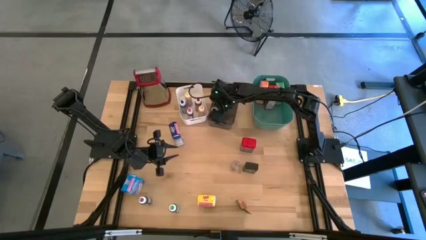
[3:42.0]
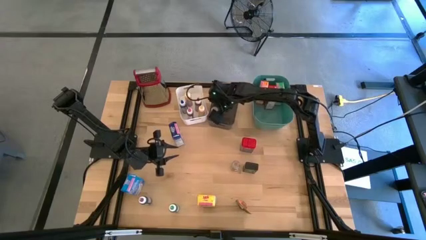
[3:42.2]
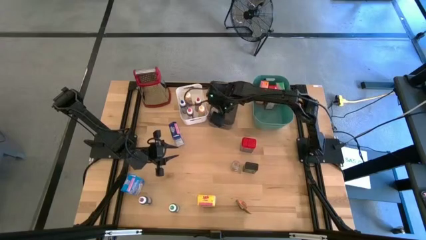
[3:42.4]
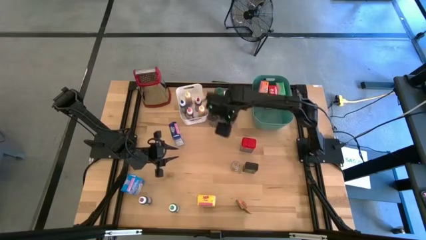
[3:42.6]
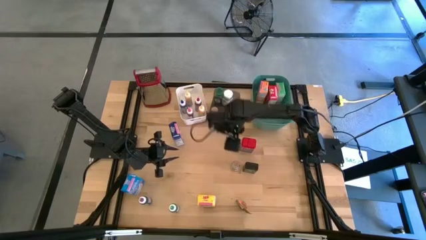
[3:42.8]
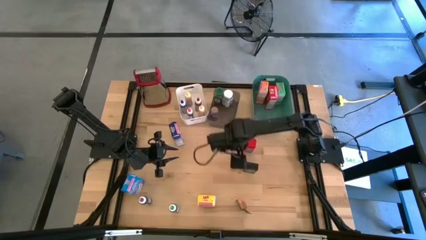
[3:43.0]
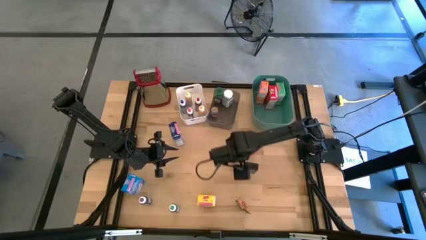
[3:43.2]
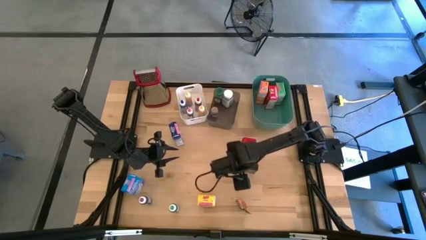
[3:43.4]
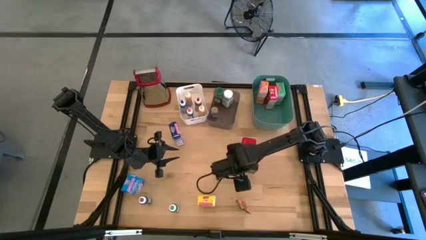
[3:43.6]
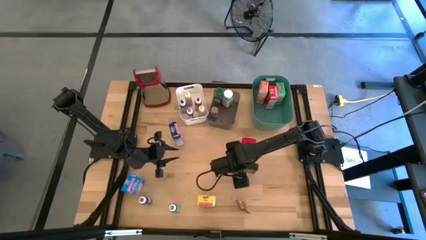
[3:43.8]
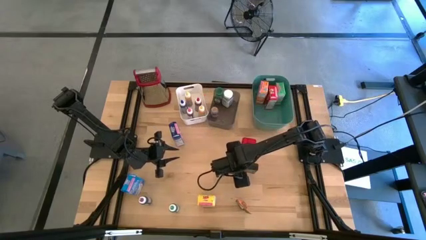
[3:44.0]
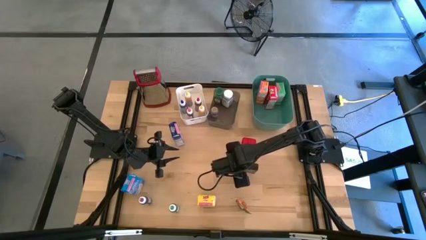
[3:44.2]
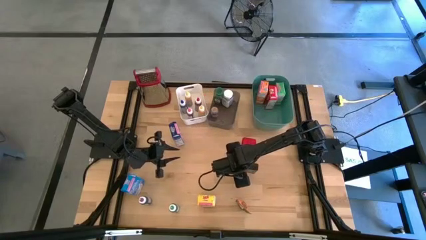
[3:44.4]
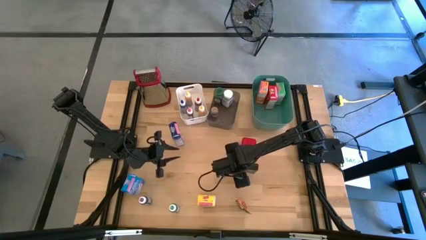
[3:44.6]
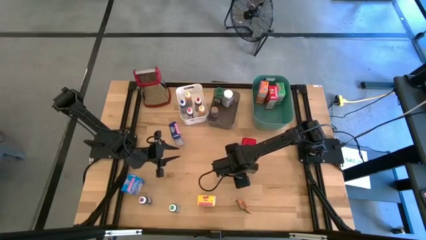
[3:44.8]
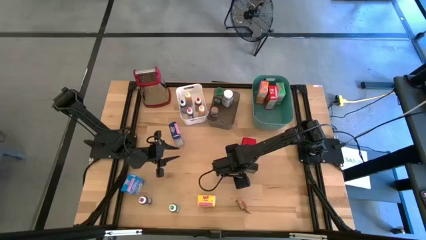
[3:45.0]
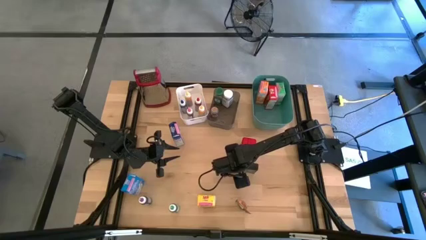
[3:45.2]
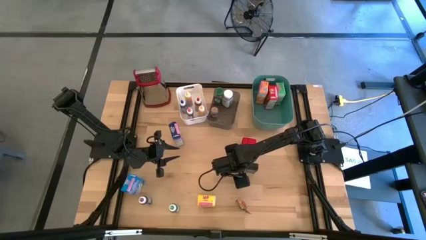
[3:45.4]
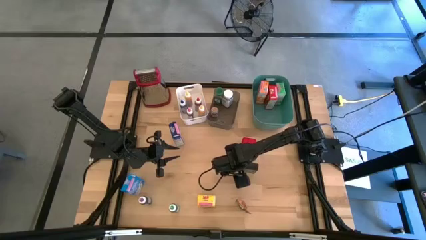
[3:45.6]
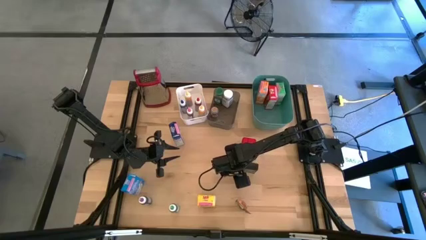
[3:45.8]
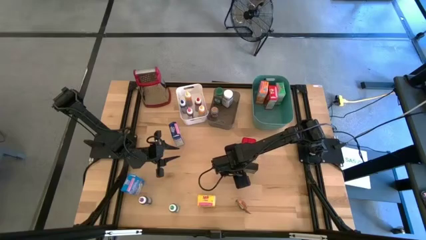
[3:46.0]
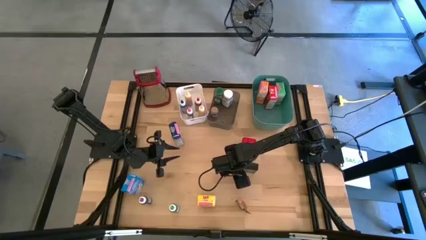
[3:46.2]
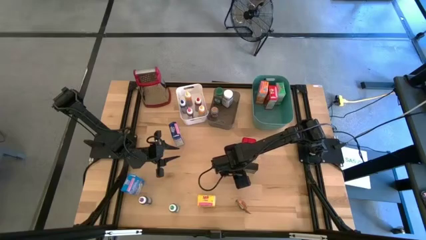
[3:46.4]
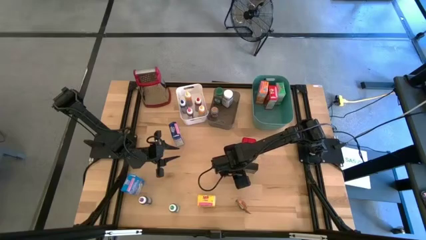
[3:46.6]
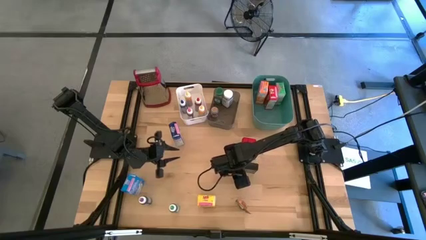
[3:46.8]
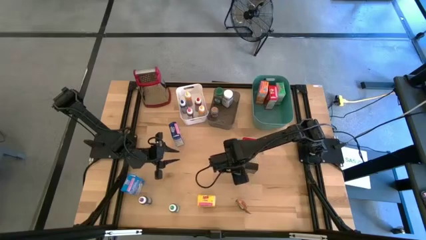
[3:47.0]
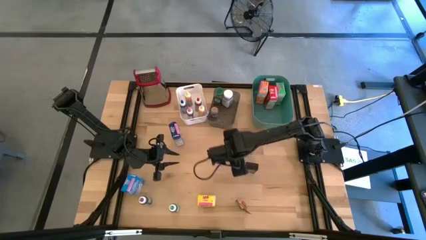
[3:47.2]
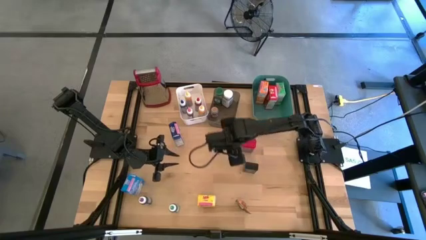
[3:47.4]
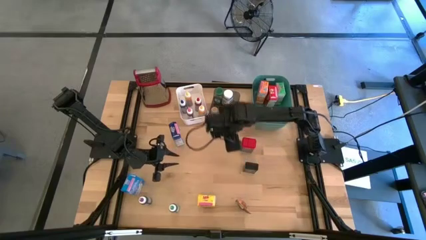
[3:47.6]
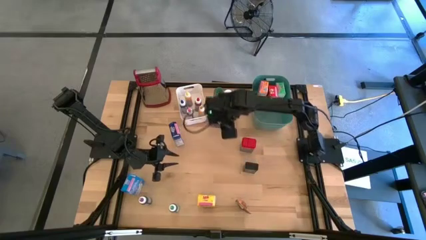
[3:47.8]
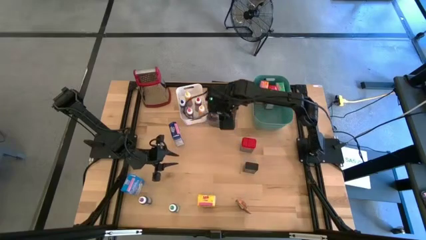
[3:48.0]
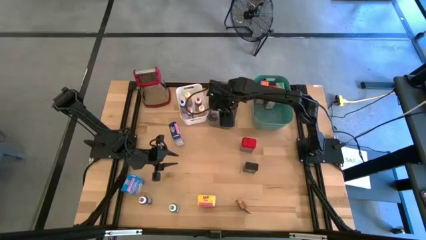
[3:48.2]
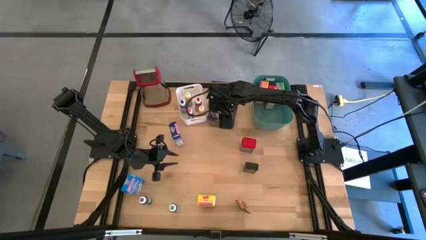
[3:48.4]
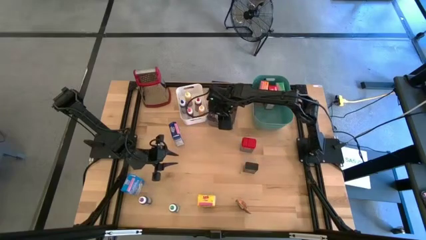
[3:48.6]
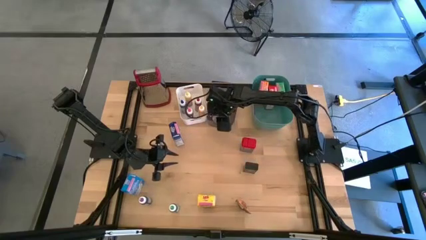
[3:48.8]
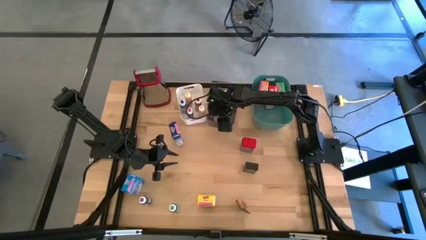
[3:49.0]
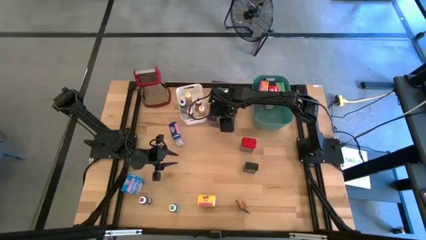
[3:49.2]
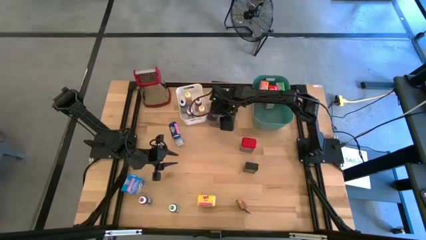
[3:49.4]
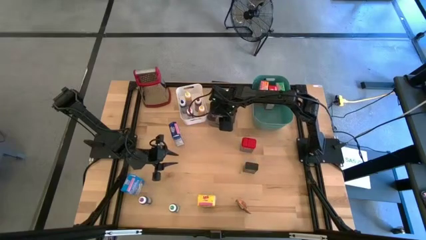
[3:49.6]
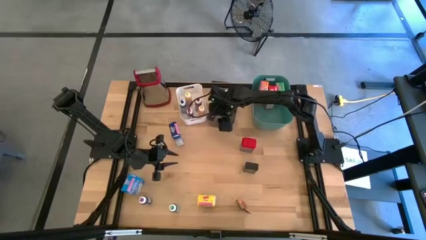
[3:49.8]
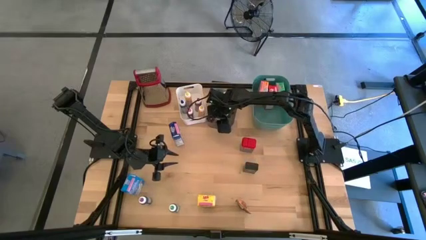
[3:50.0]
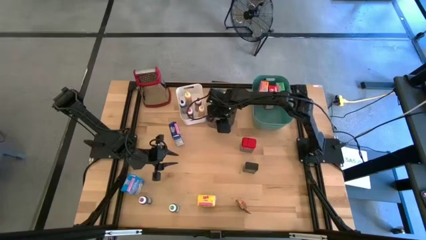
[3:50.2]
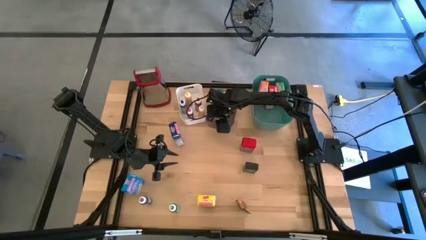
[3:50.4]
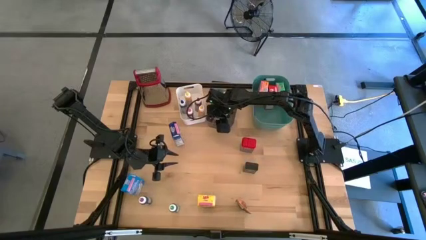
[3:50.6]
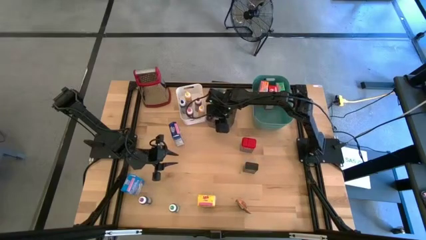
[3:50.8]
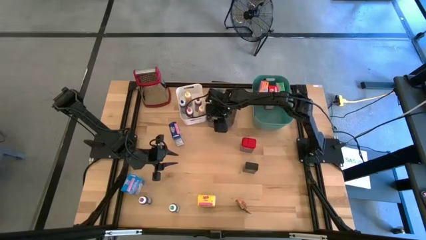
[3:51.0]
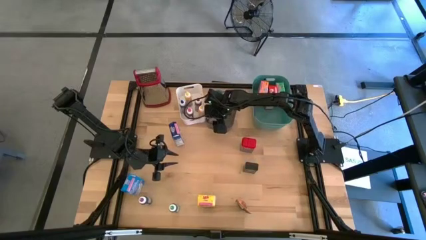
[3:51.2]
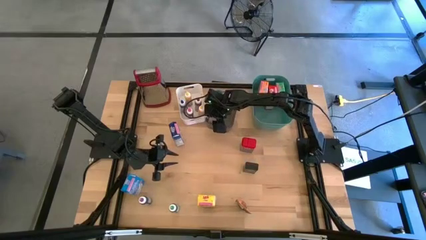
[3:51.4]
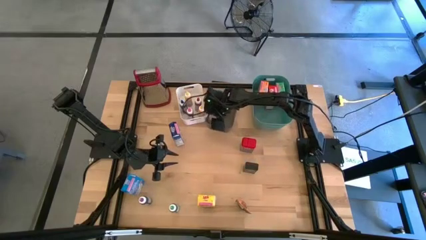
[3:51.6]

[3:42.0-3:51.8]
Task: Pick & Place Kitchen Items
Put the brown spice bottle into the black bin

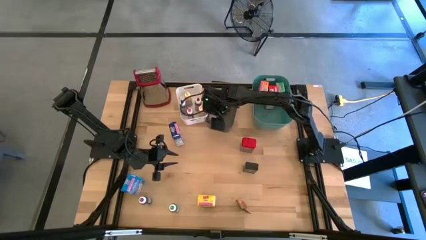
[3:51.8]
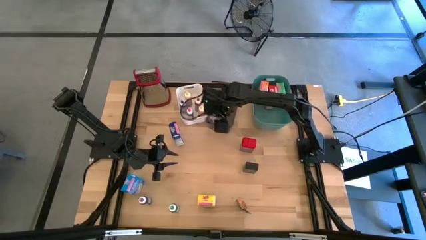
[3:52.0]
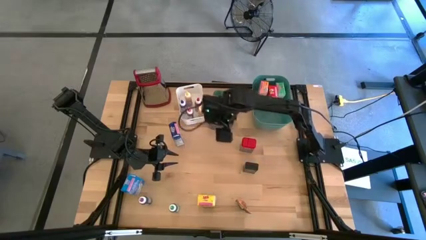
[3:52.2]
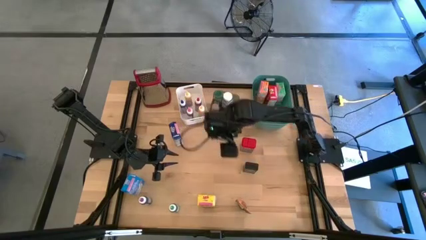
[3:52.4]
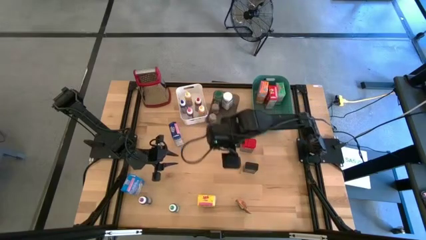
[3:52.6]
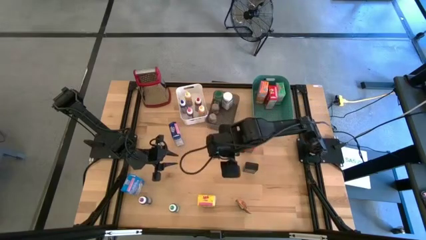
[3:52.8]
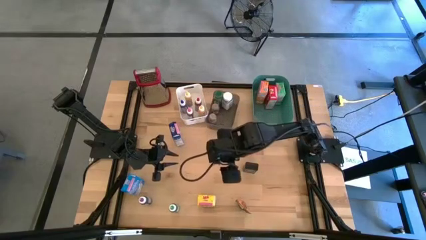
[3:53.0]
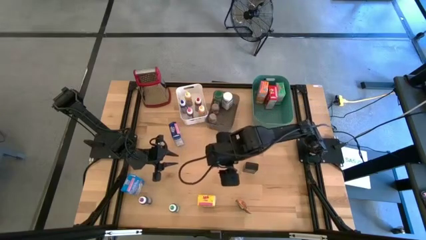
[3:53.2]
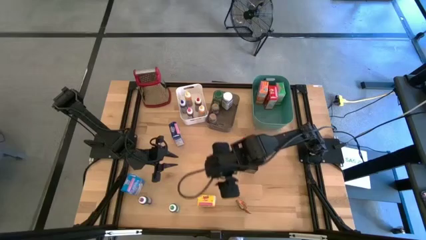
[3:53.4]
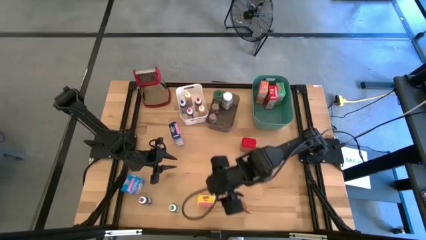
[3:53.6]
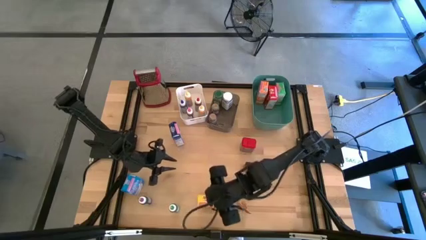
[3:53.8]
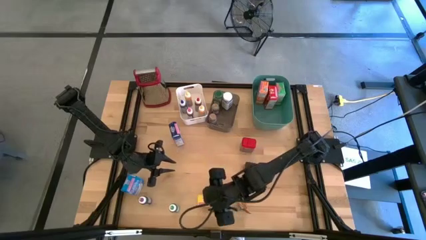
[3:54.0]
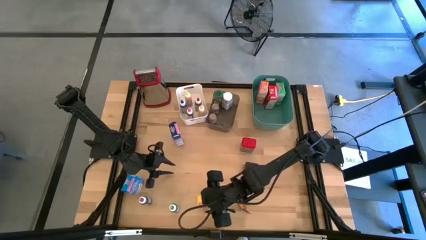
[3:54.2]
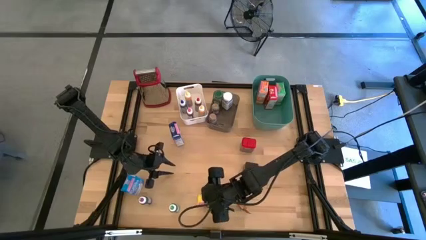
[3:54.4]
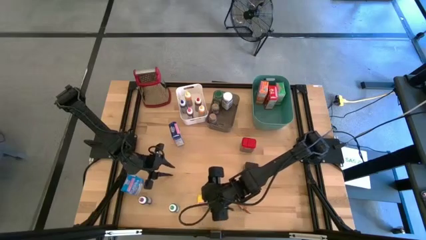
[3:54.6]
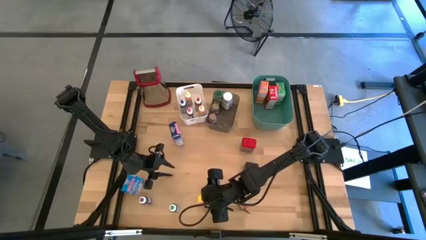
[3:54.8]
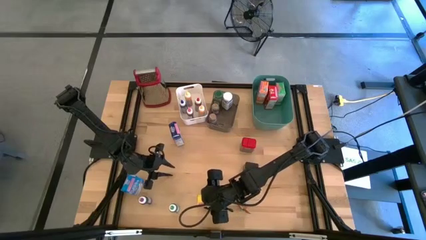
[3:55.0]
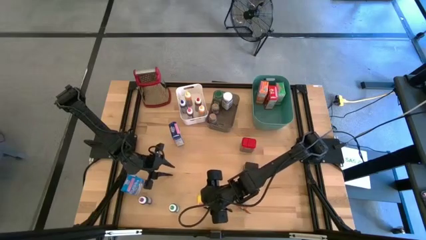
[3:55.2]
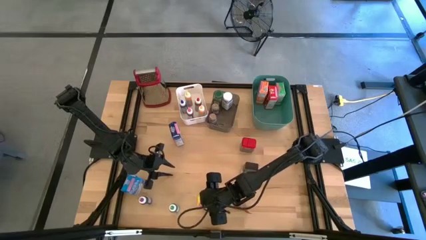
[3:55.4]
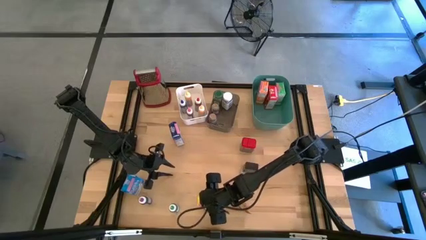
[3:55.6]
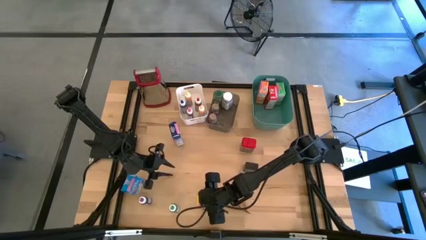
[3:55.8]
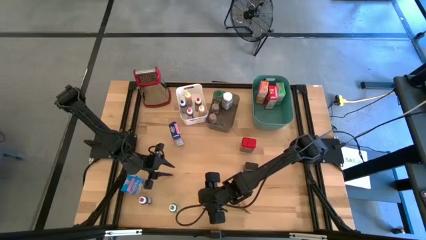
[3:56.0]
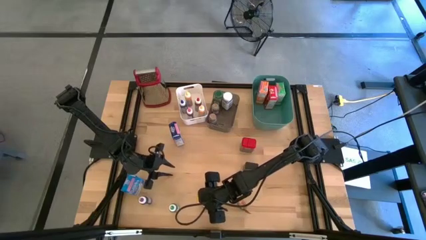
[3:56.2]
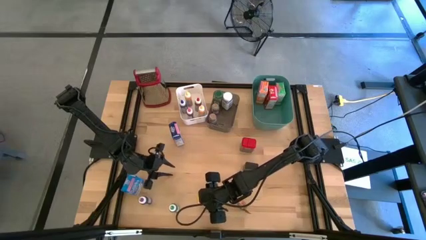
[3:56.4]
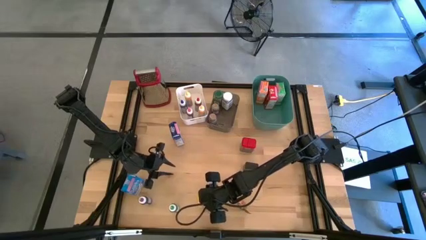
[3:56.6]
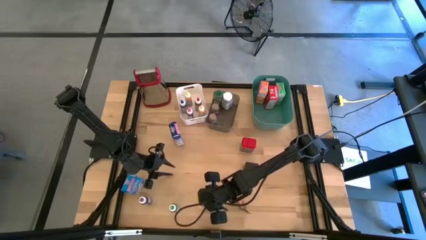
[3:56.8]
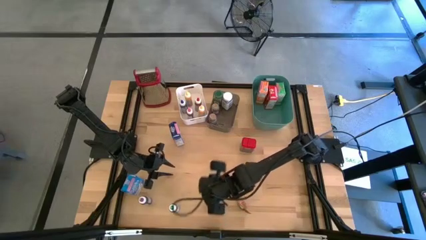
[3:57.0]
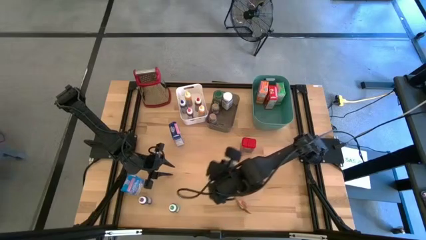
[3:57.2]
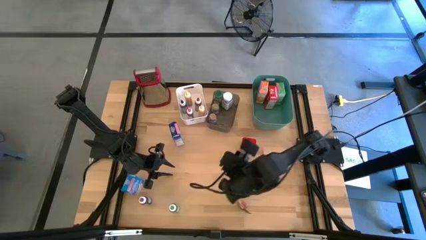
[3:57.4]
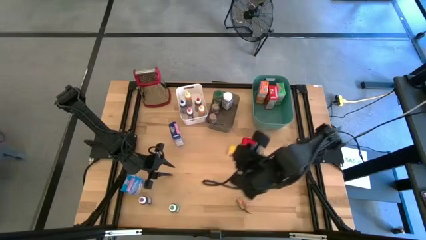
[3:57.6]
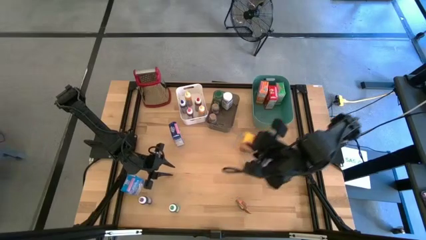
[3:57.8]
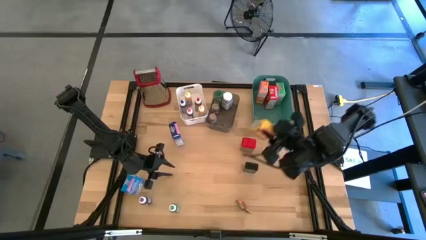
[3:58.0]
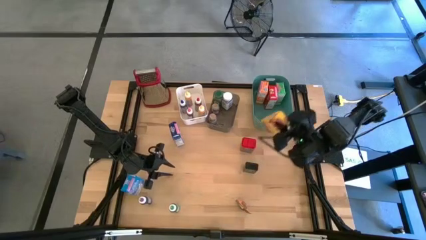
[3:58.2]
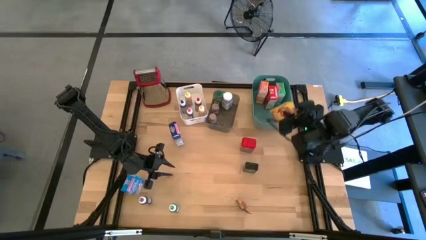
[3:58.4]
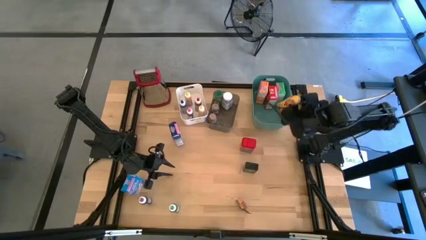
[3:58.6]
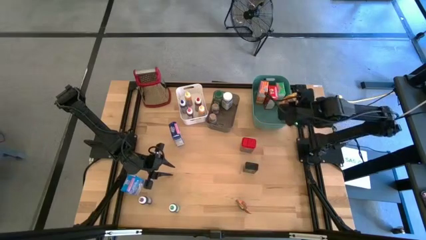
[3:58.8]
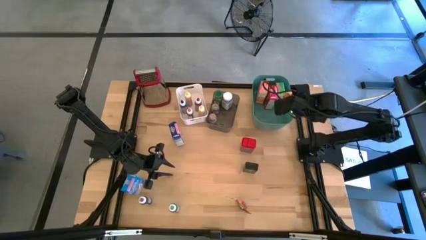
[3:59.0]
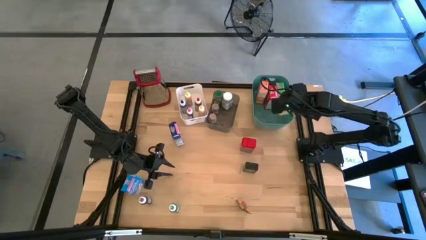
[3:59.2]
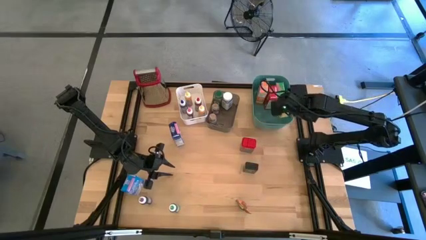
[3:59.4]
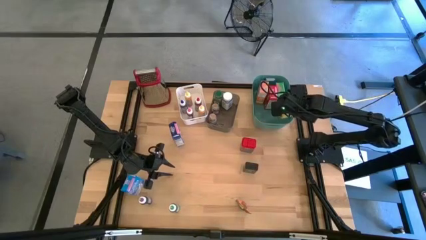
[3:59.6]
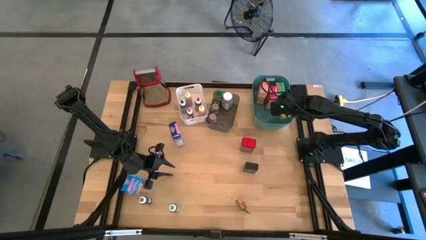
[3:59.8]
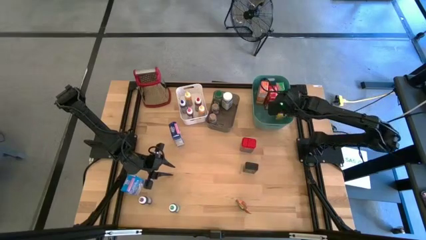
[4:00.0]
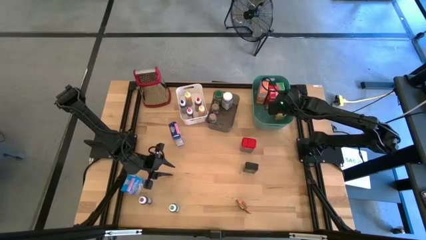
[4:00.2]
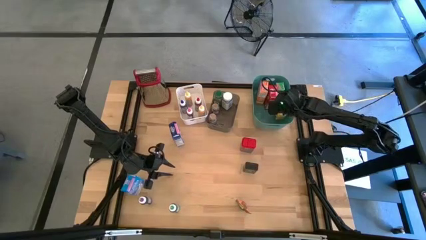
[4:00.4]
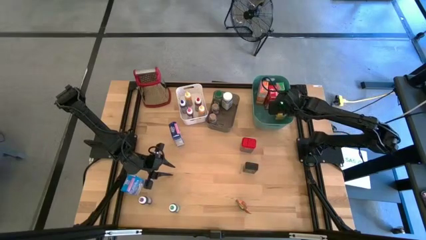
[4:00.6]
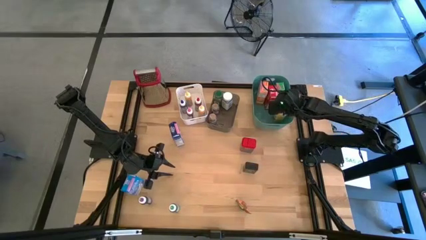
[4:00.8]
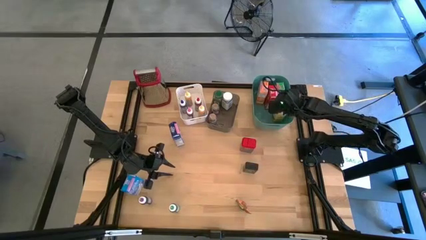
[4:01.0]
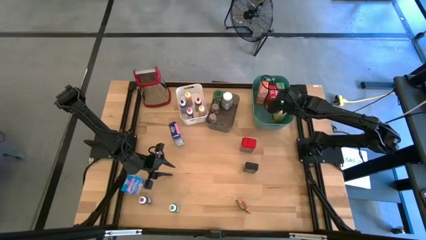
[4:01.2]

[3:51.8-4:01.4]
Put the yellow cereal box into the green bin
